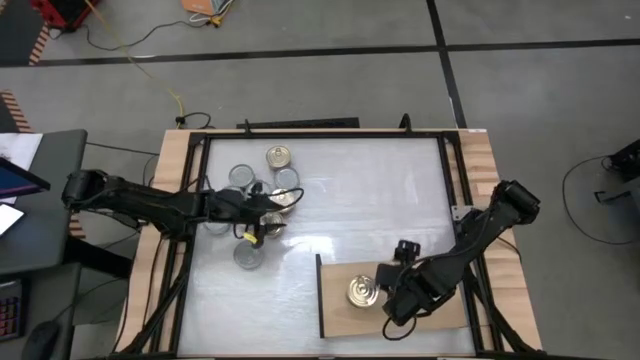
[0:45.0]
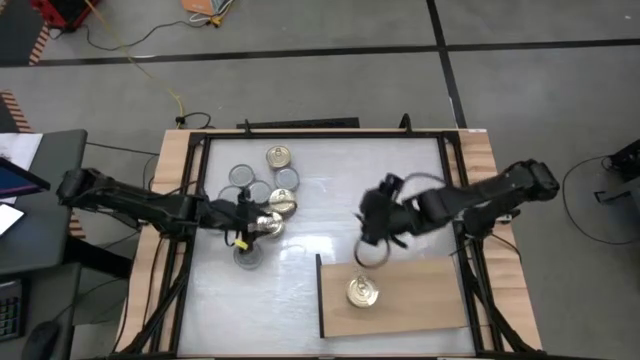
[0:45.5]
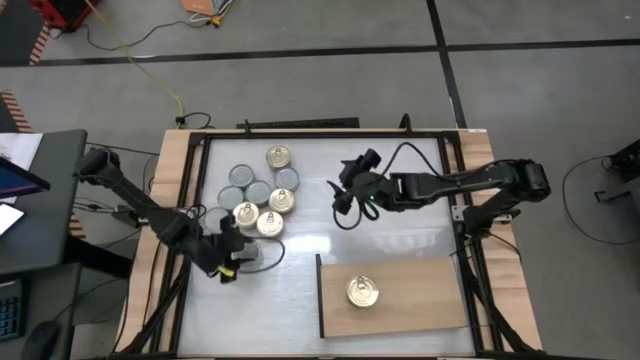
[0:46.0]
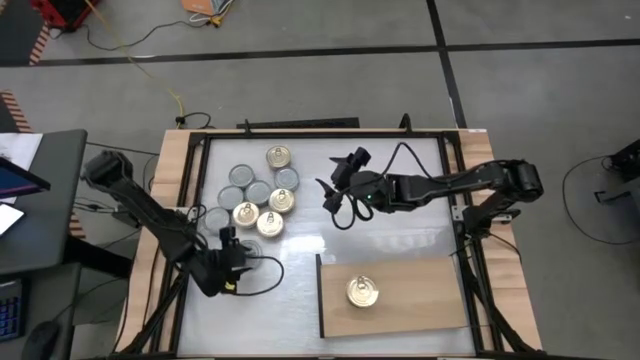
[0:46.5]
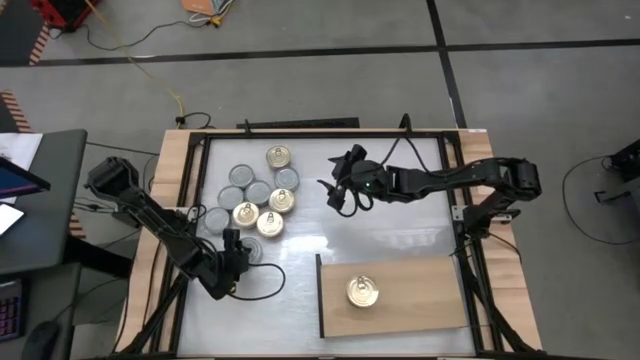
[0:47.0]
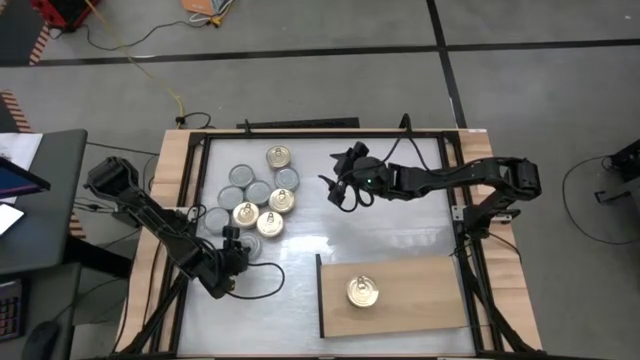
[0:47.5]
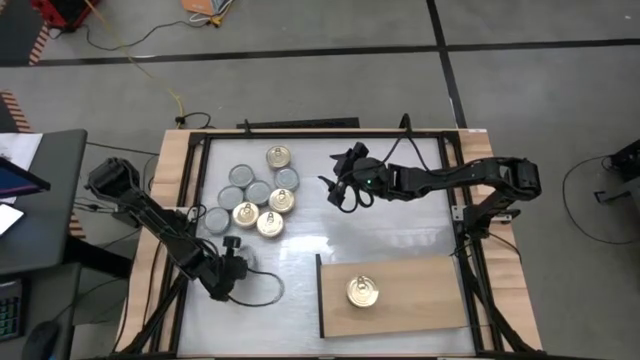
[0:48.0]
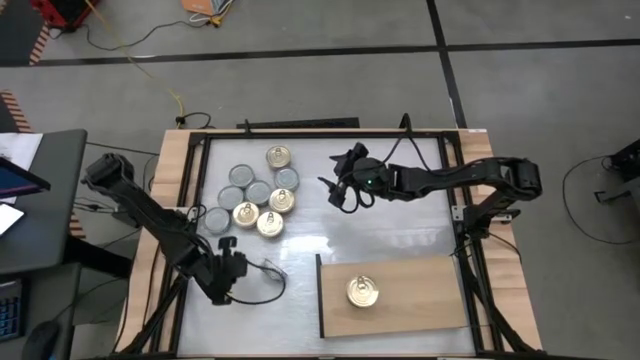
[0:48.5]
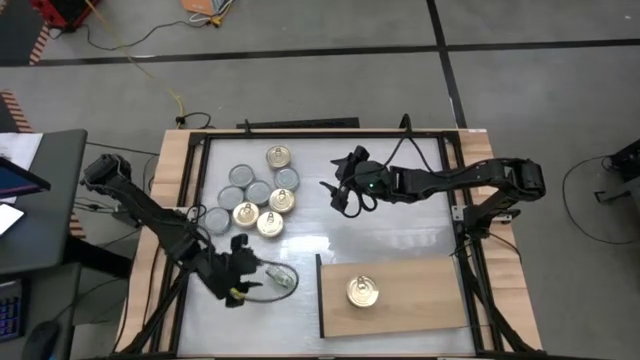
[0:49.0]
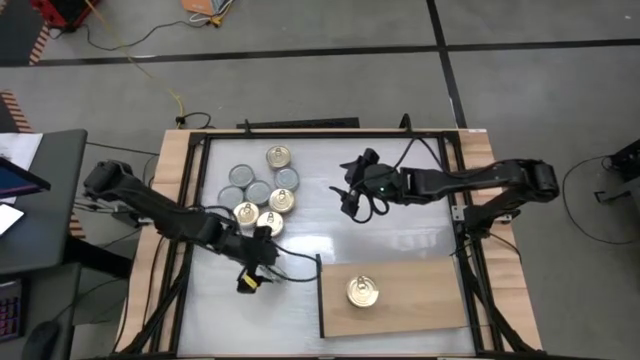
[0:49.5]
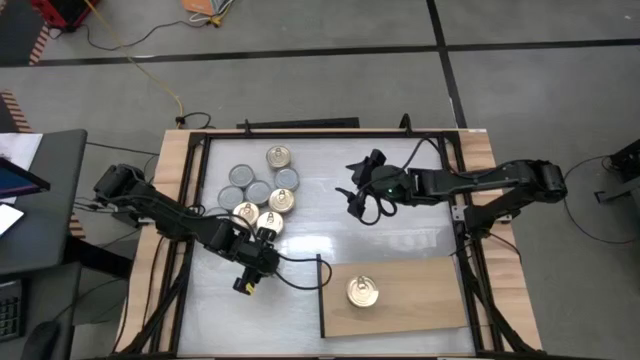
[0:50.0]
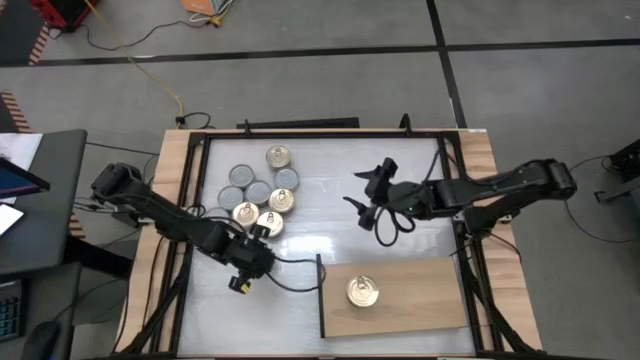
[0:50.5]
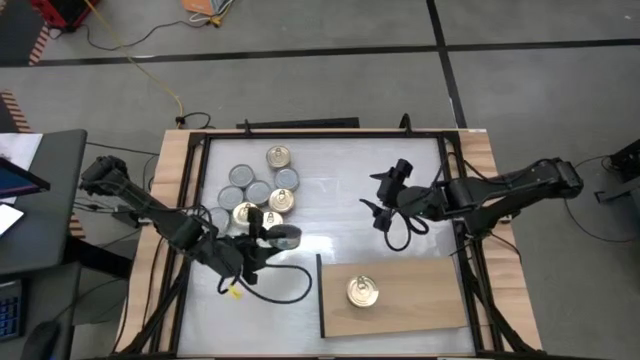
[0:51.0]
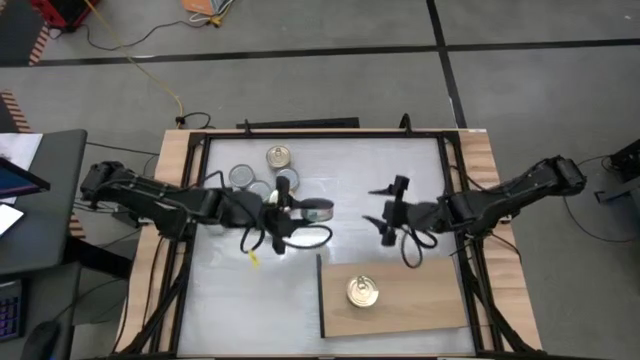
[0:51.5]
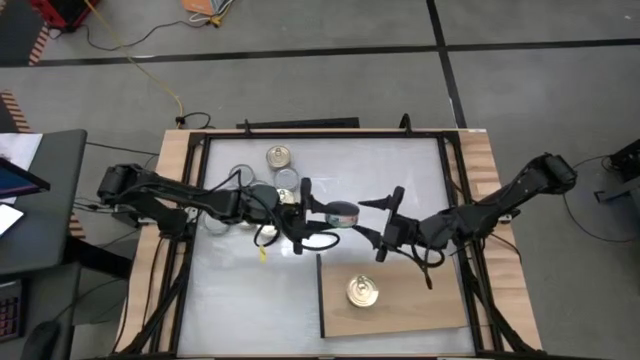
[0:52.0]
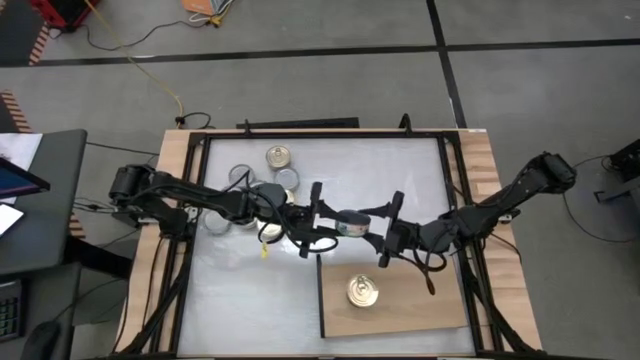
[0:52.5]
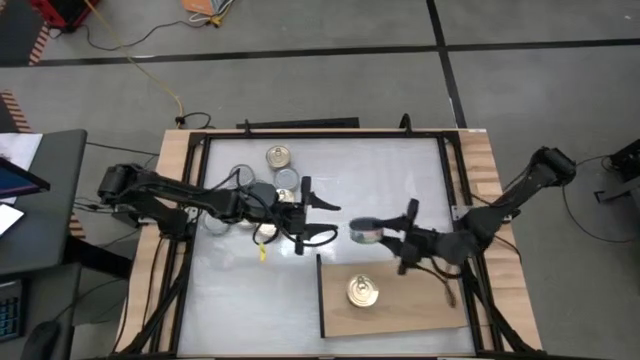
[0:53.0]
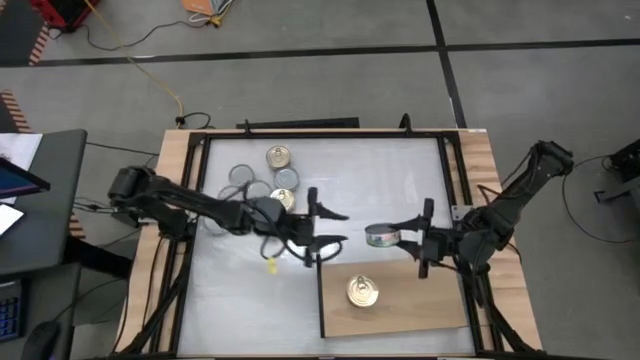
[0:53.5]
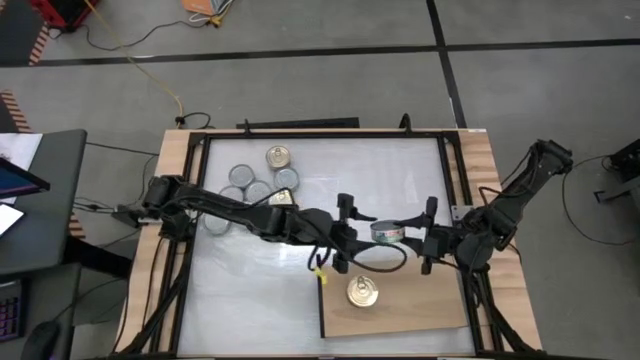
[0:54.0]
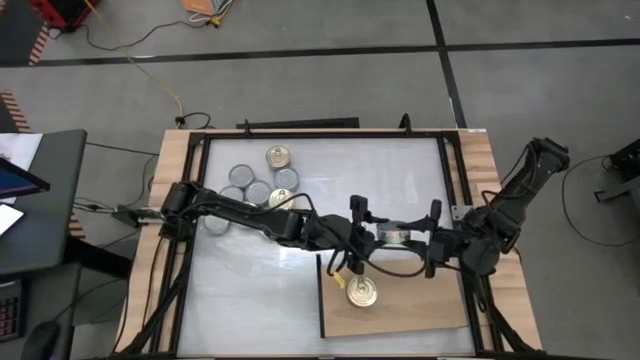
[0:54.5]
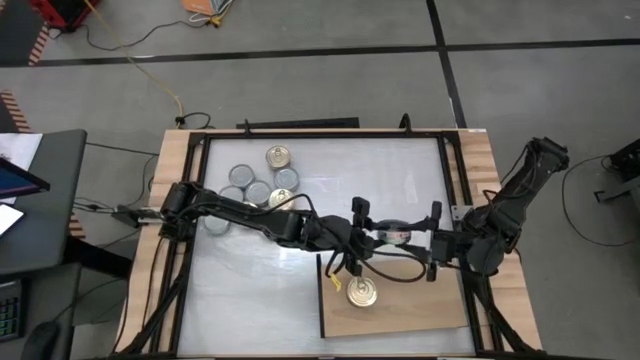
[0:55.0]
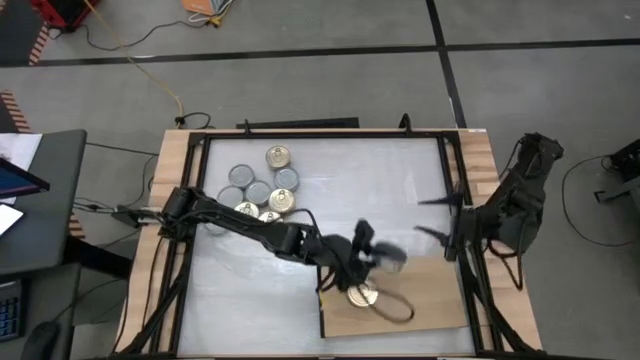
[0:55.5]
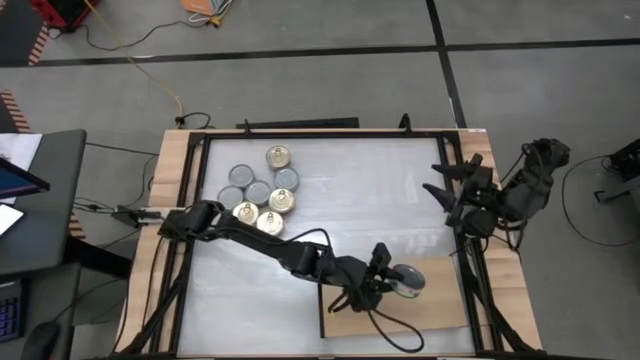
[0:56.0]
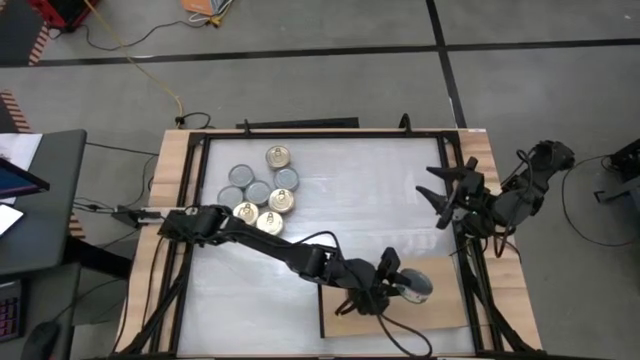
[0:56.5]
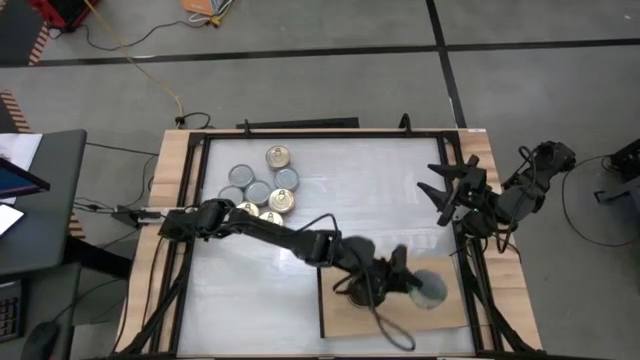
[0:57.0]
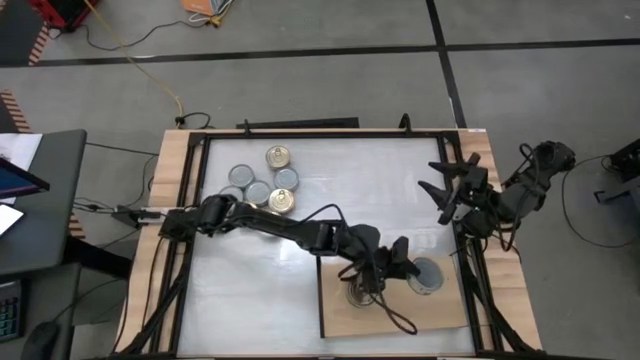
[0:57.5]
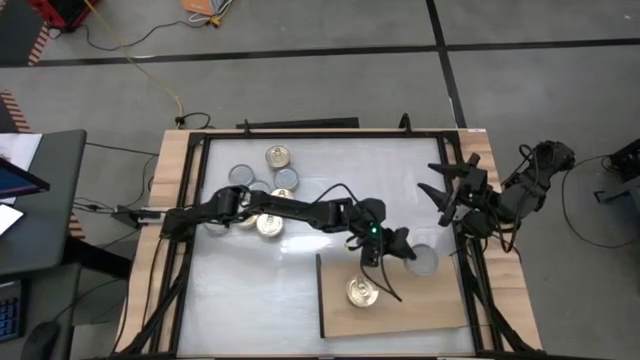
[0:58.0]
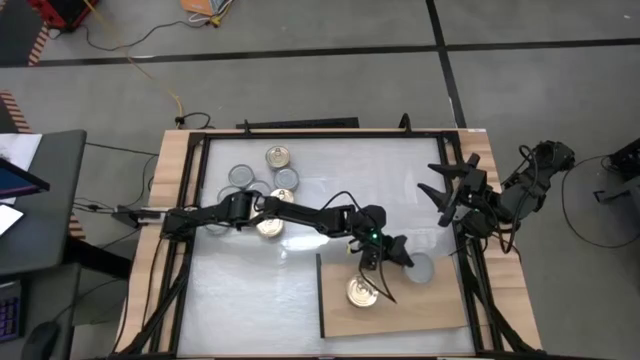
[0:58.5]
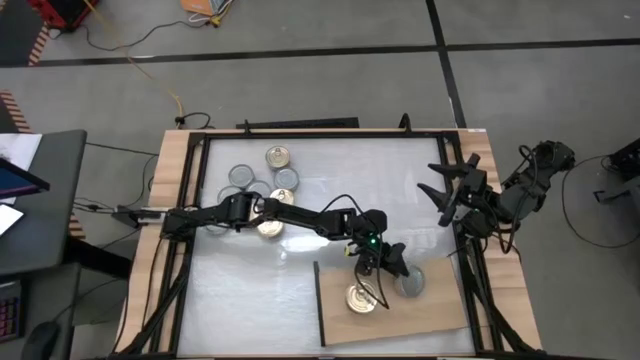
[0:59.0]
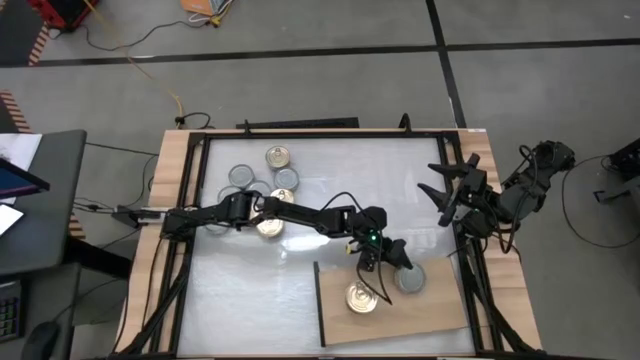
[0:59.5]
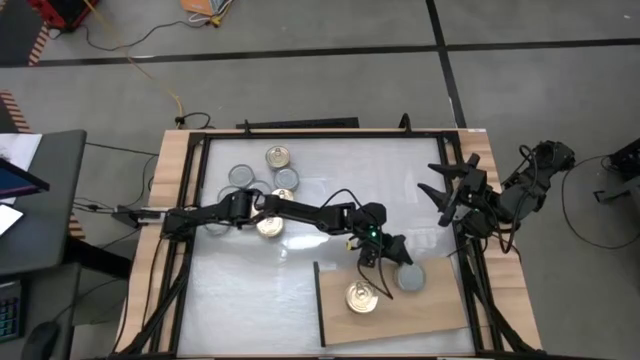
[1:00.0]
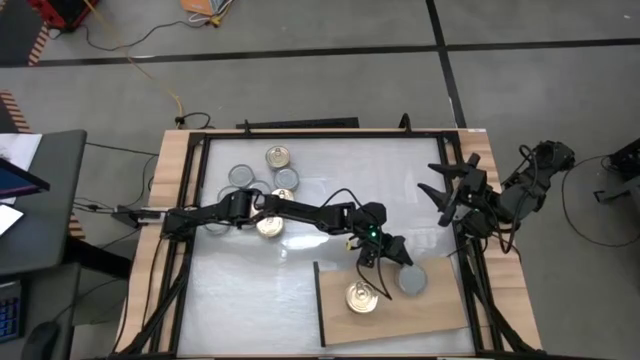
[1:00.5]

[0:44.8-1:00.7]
Task: Stack canned seafood by type on shelf
Put the green tuna can on the shelf

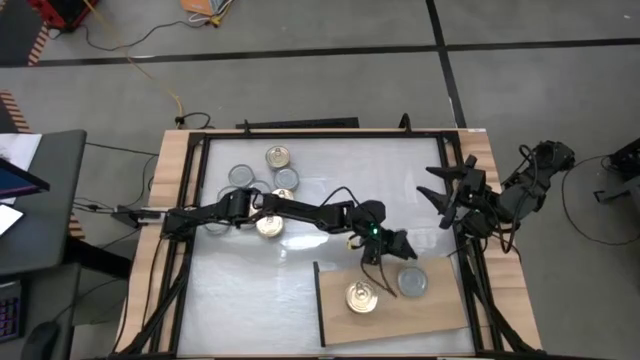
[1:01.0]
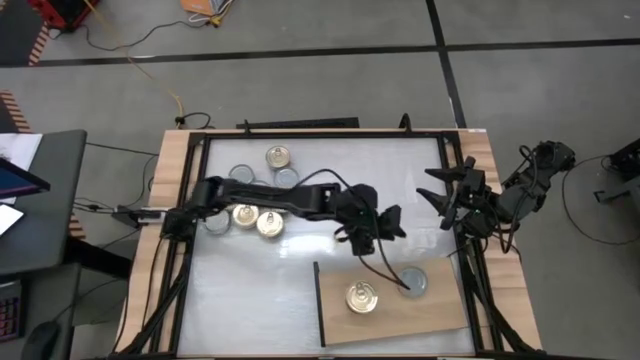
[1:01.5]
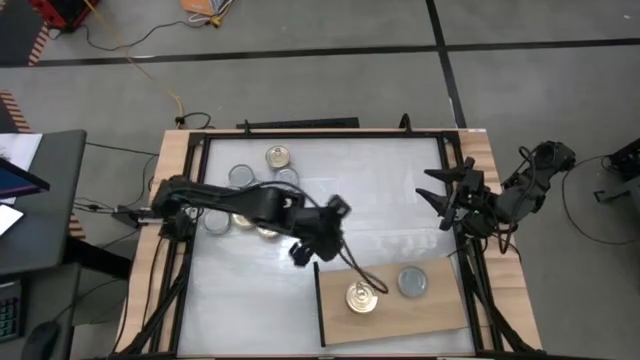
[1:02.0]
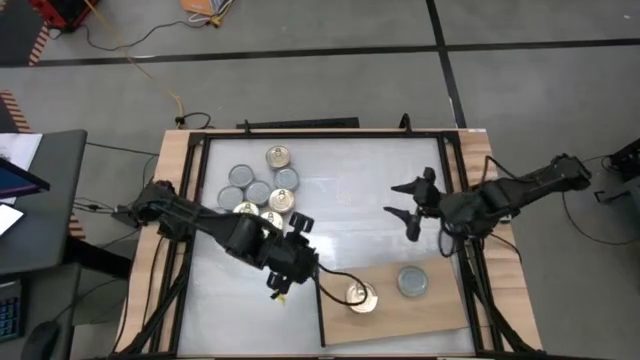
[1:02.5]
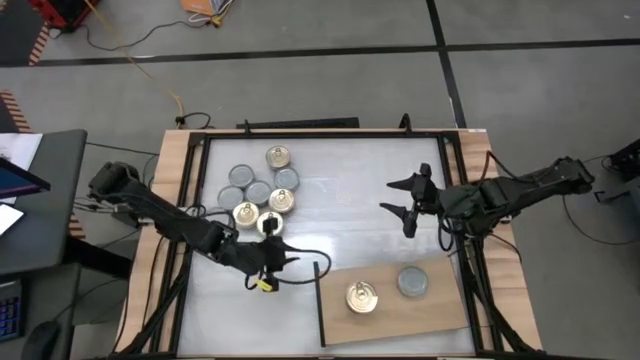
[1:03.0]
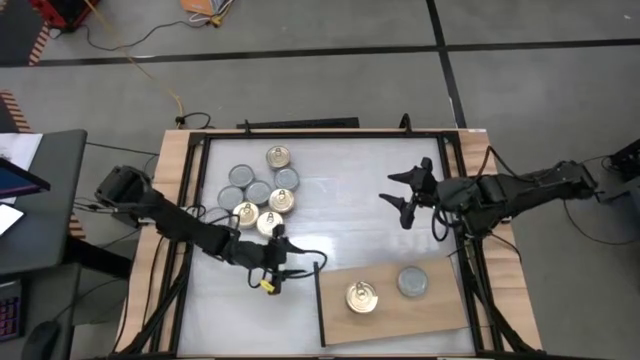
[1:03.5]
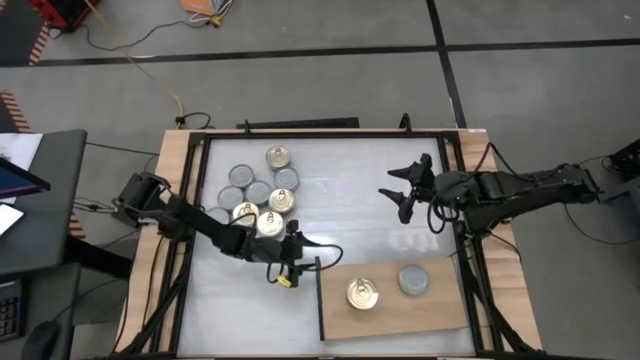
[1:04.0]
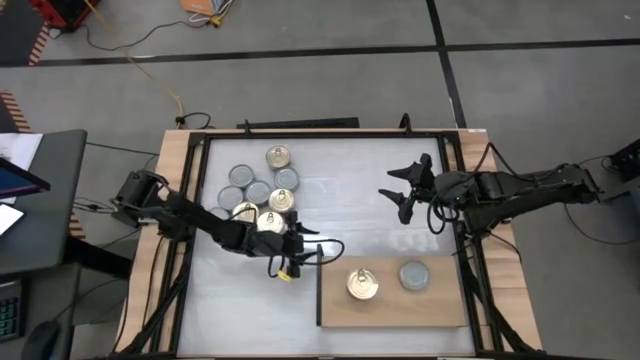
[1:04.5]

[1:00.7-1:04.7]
Adjust the shelf
